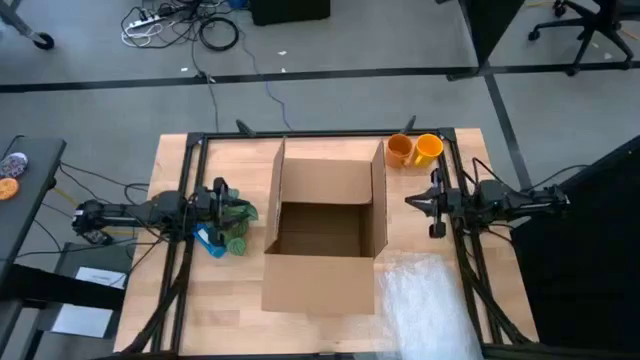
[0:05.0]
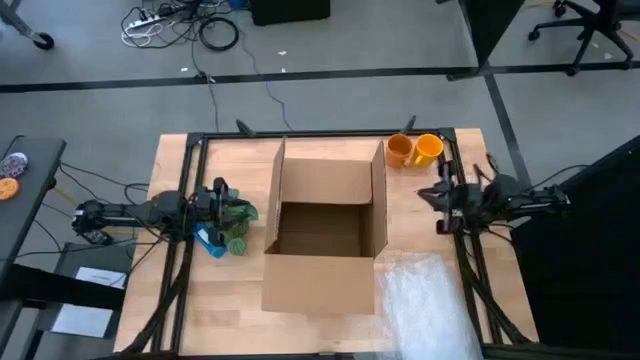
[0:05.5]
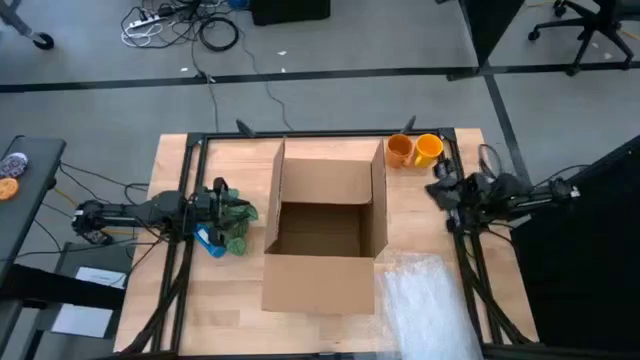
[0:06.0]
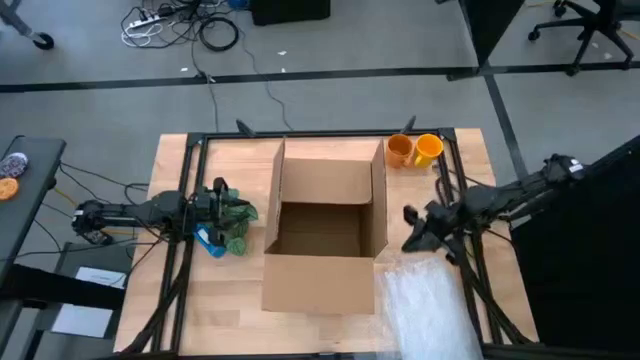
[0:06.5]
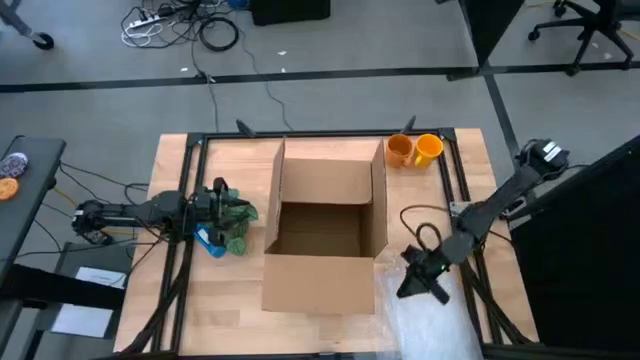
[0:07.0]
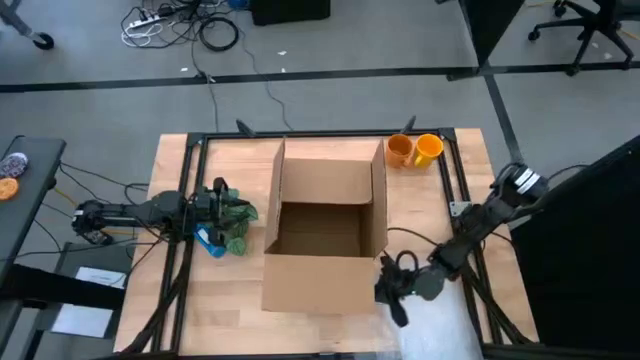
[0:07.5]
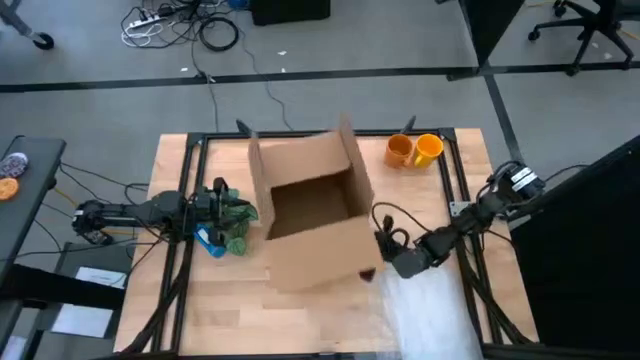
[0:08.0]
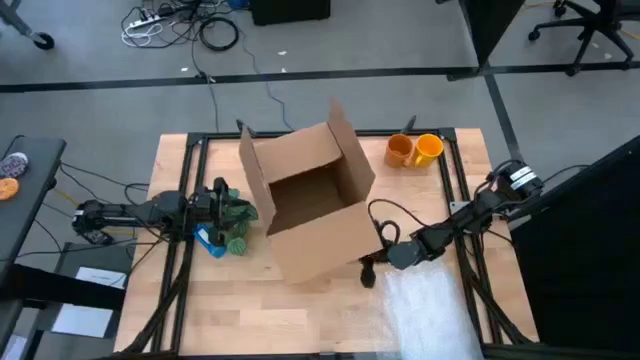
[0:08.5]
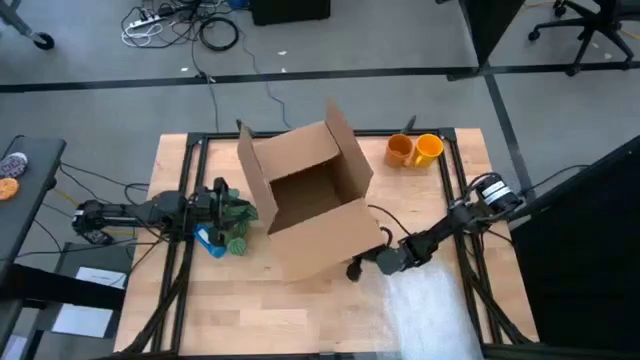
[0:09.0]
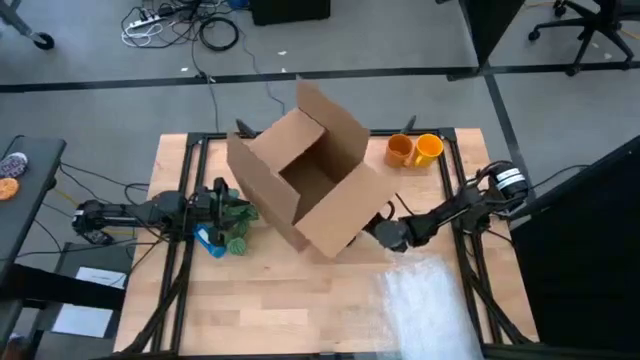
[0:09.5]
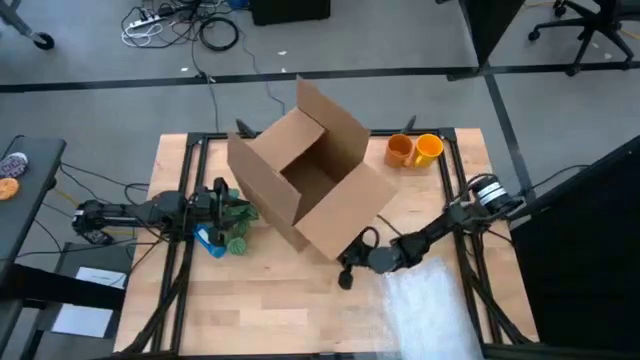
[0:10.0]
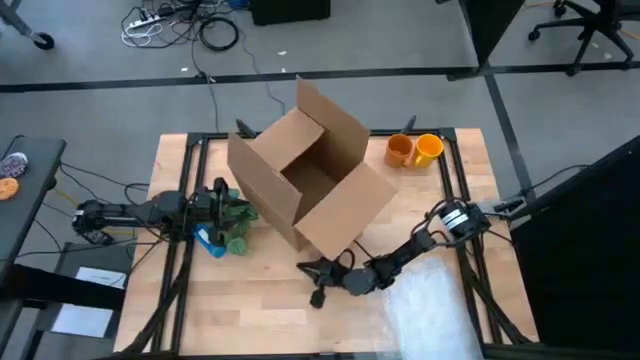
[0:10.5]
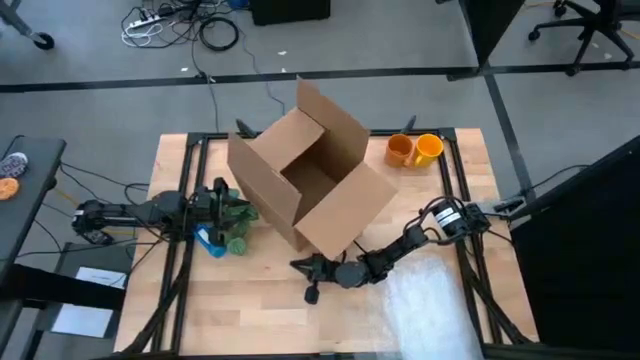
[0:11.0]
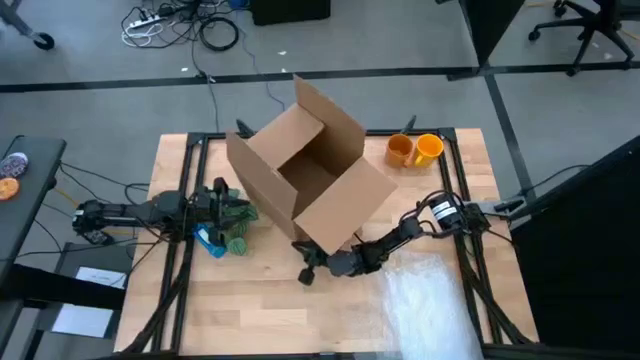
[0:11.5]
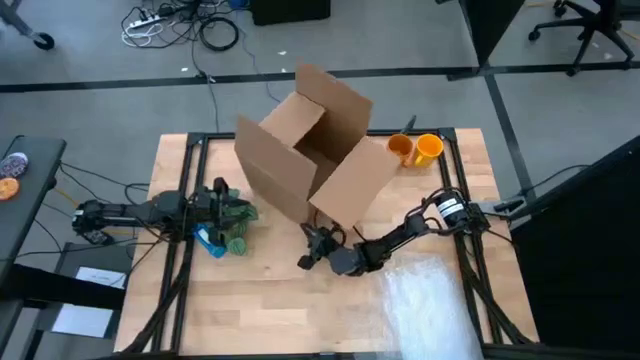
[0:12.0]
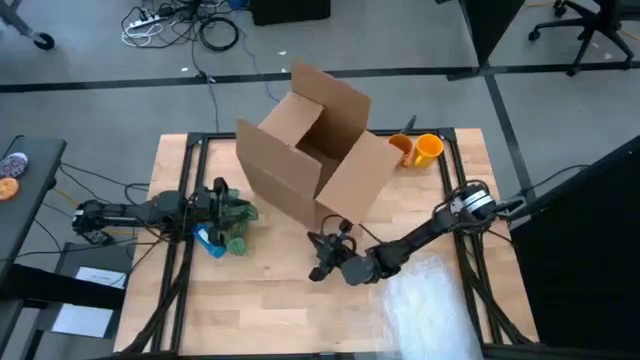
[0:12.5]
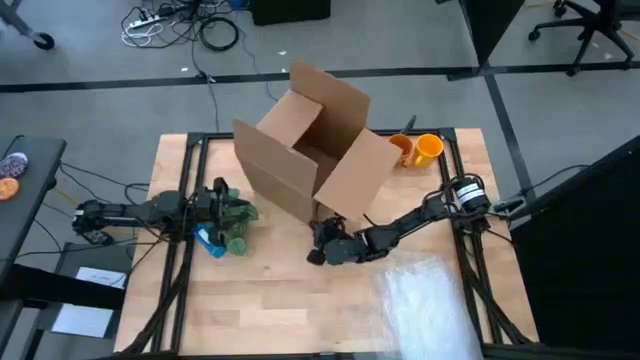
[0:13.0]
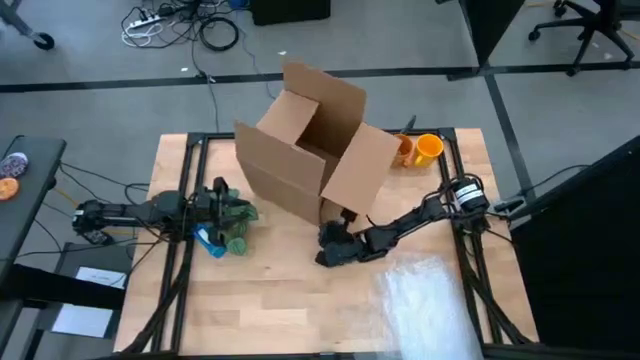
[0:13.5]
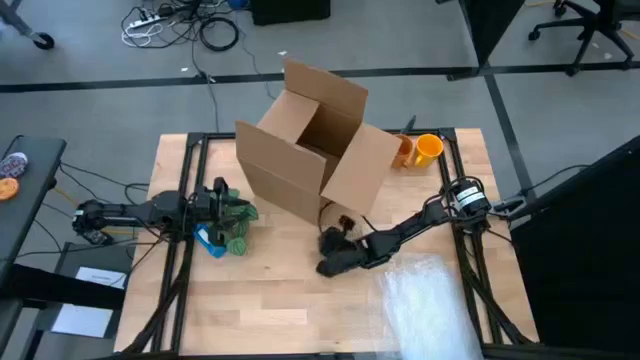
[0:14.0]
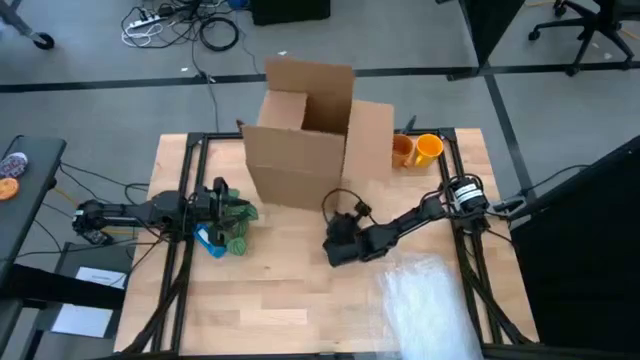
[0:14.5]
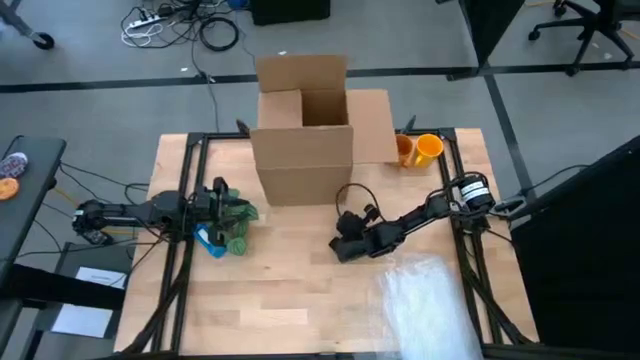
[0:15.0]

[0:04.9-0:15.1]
Task: wrap mug
Move the brown cardboard box to the top of the table

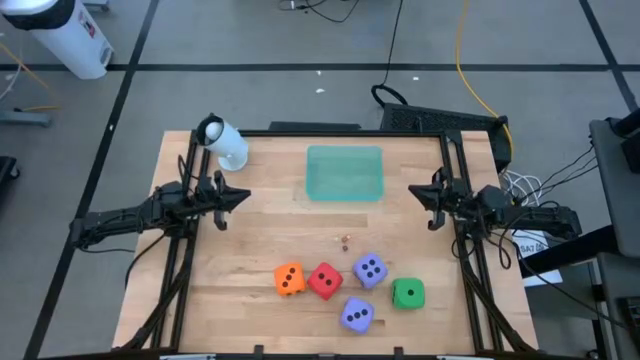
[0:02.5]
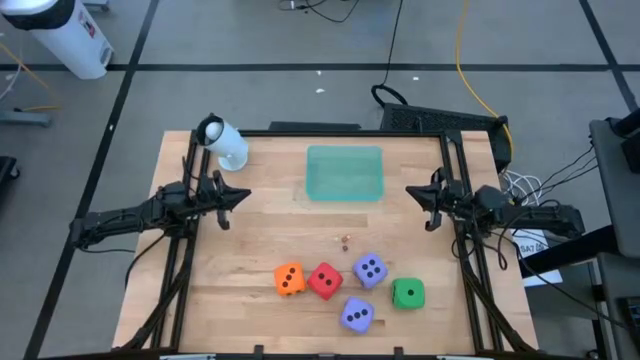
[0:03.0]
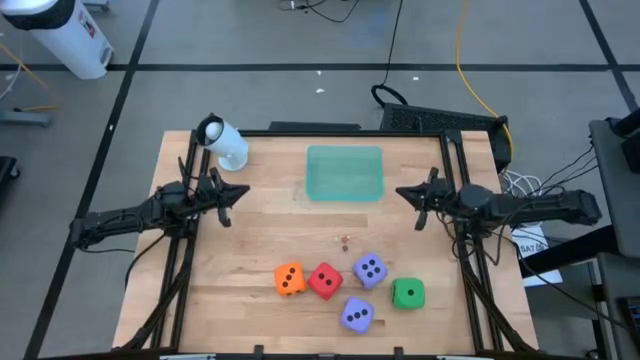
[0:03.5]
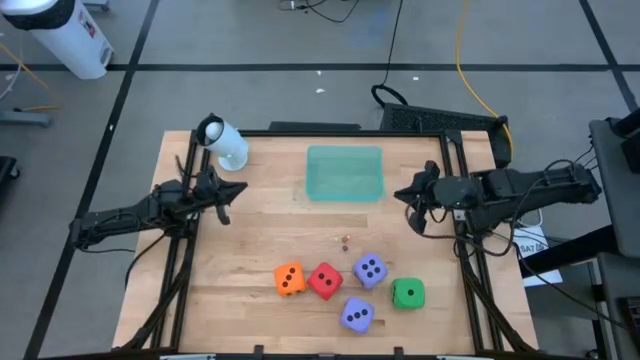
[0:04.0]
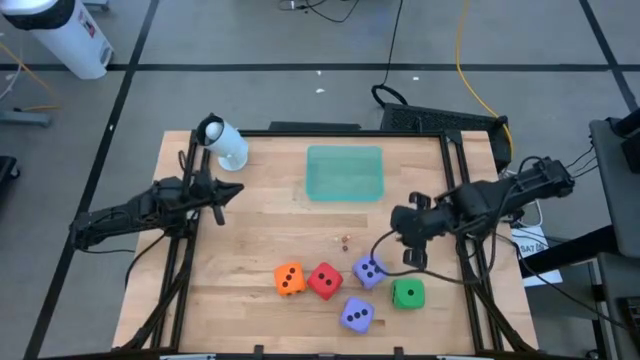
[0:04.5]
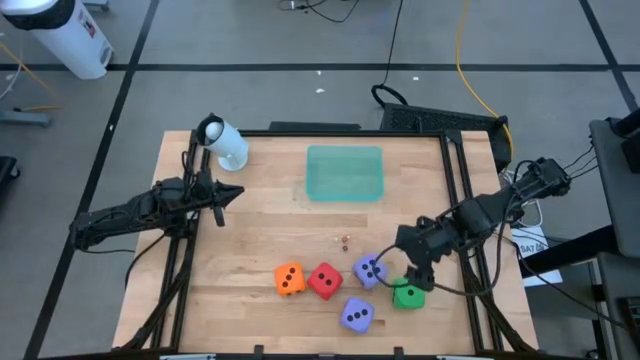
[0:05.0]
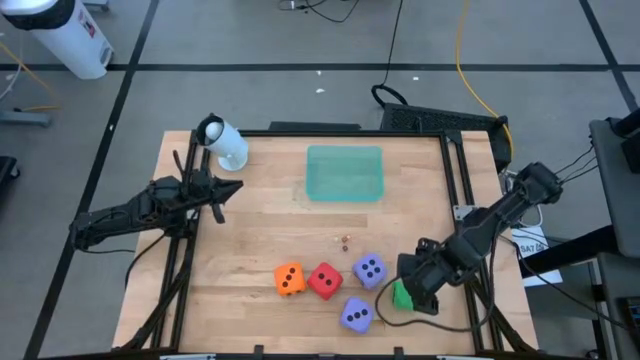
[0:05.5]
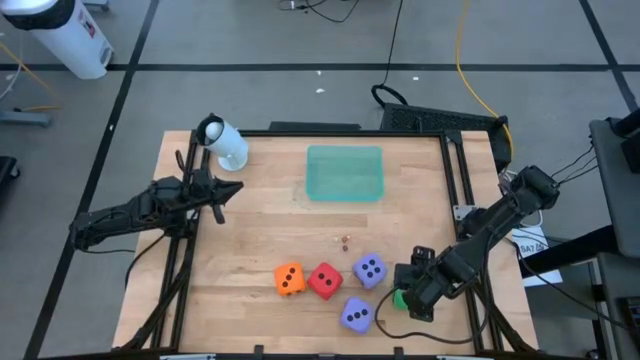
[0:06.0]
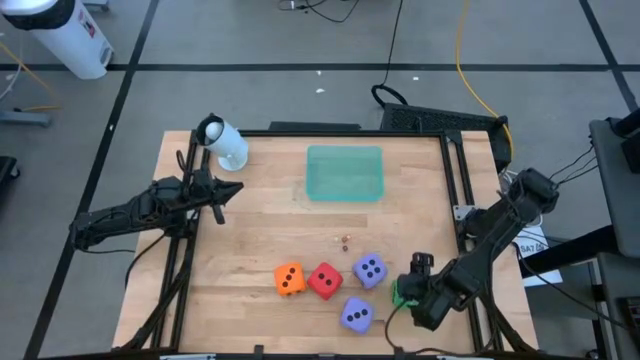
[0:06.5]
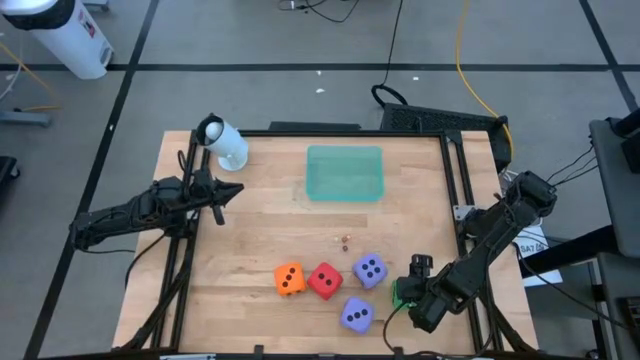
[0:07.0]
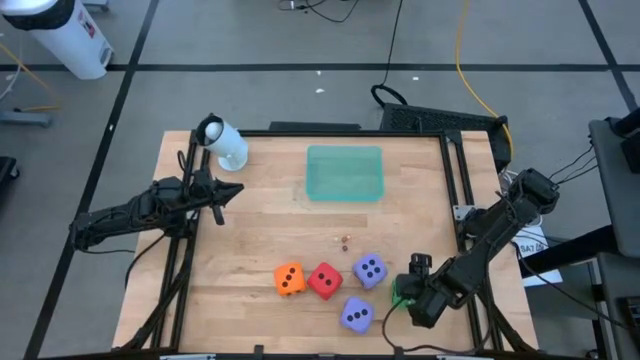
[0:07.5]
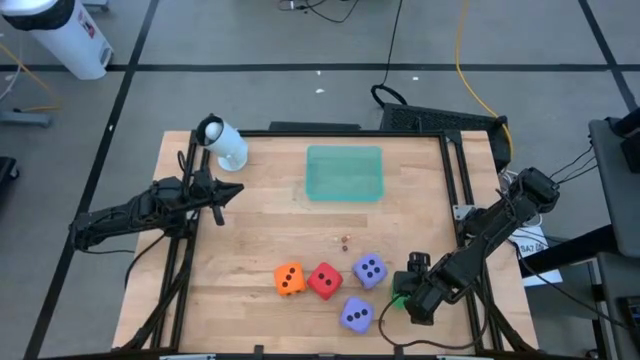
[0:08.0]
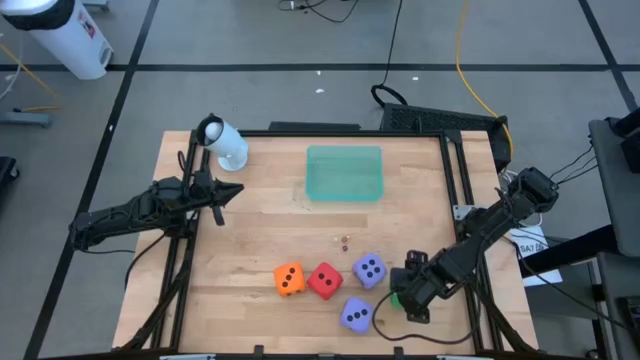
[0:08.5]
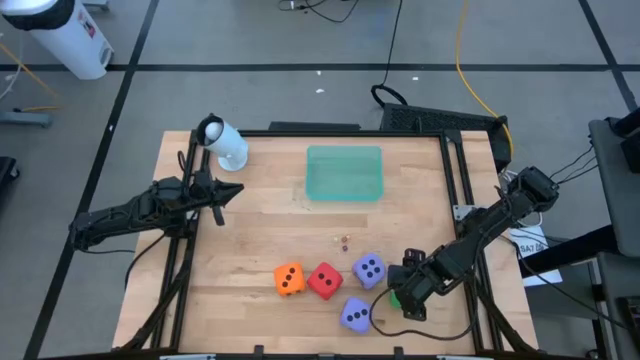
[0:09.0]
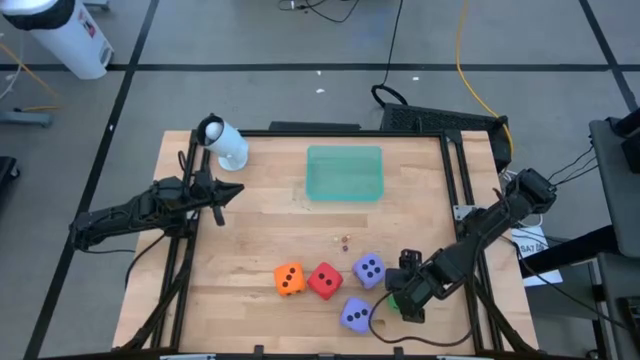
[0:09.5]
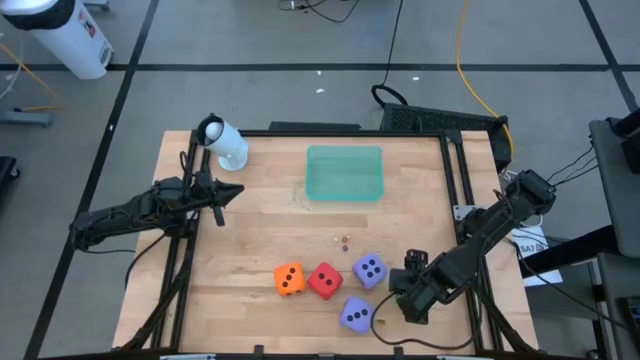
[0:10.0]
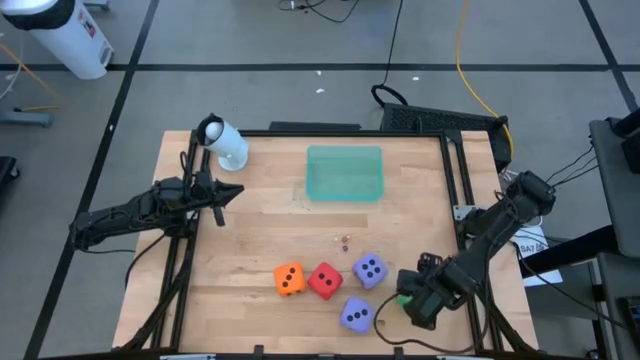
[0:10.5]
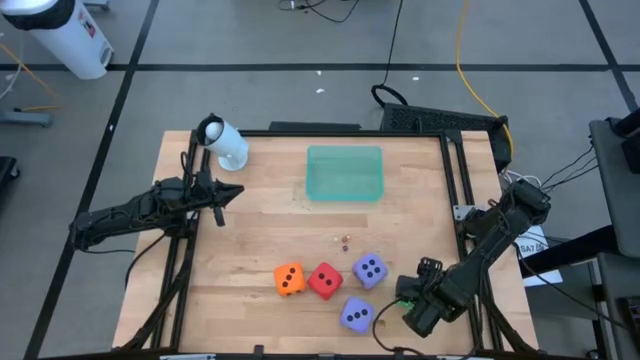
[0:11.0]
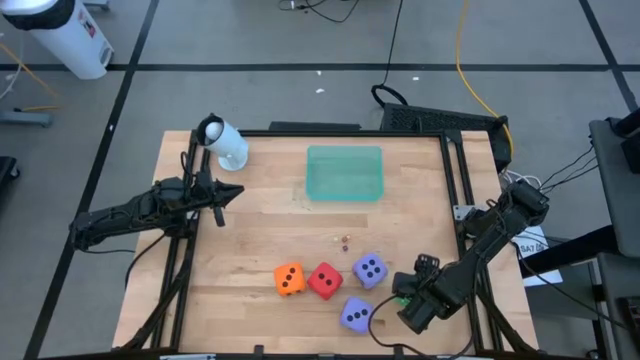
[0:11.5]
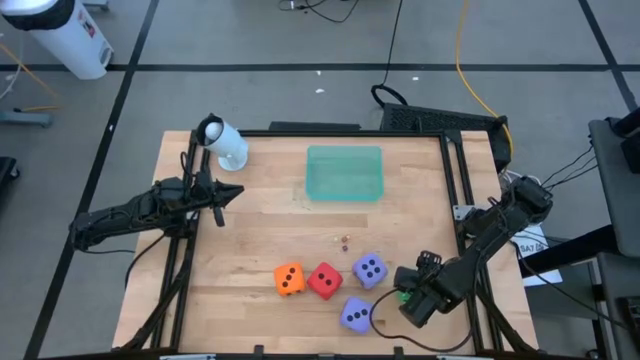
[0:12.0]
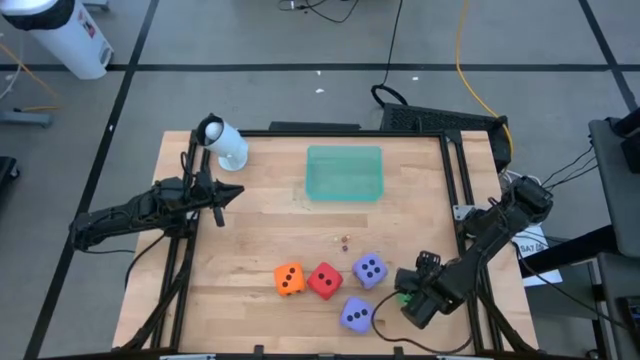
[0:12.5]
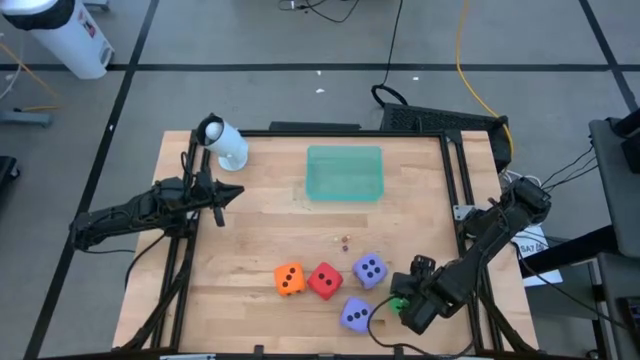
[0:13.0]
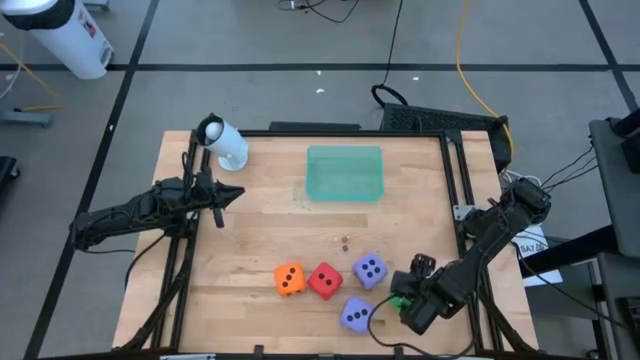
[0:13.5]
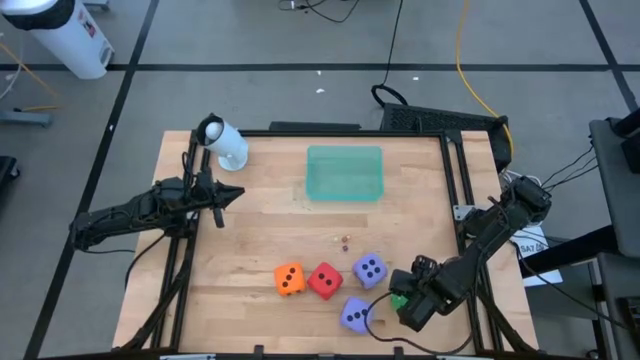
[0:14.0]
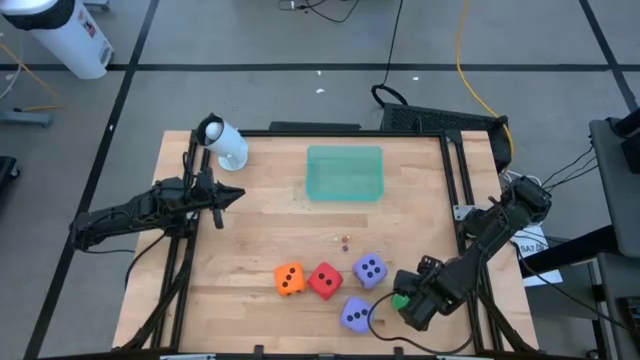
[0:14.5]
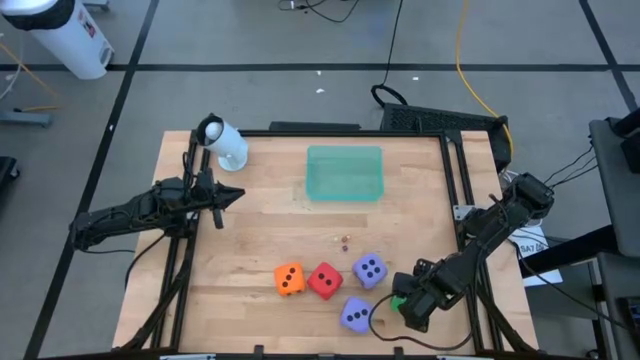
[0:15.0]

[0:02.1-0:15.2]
Task: Pick & Place Dice
Put the large green dice into the blue bin
